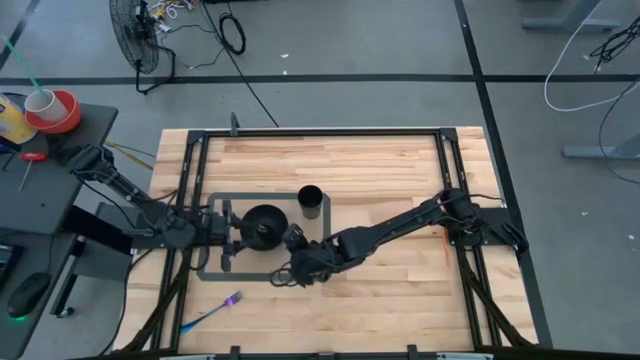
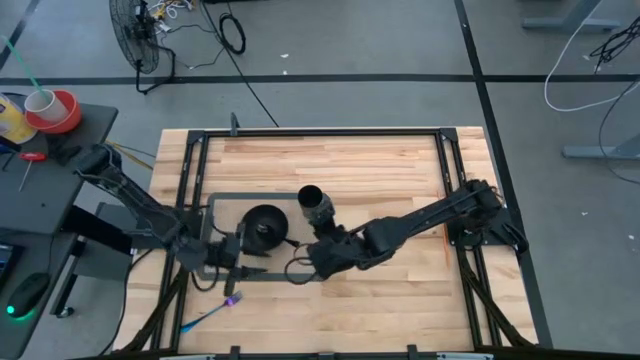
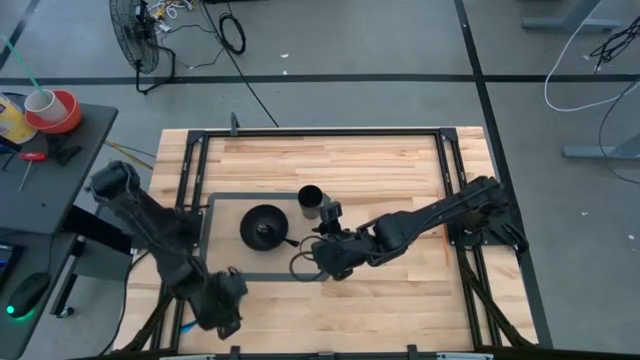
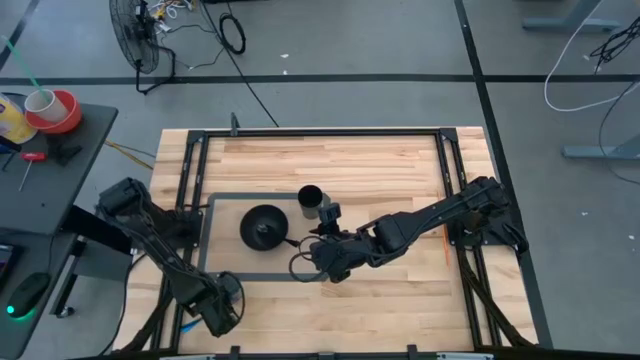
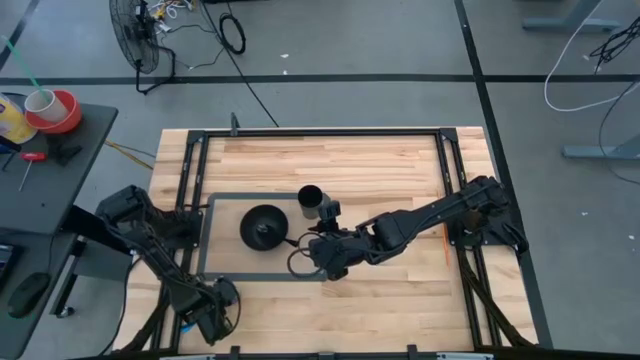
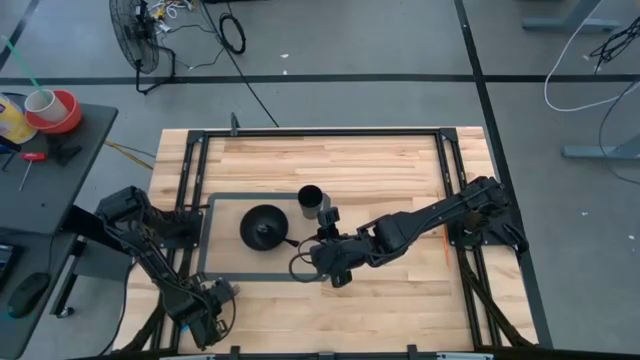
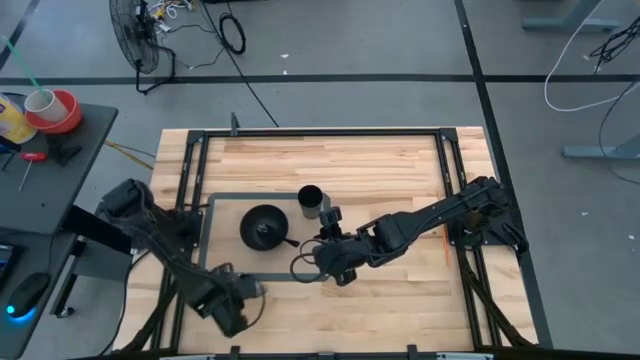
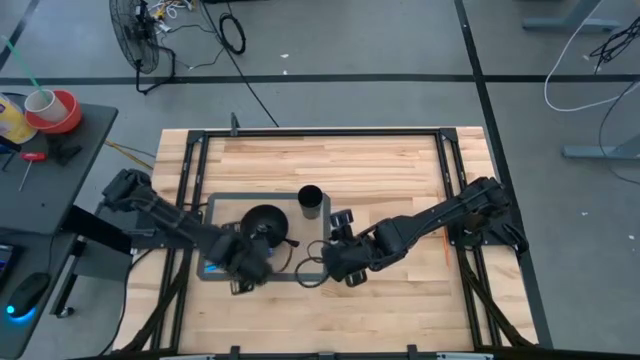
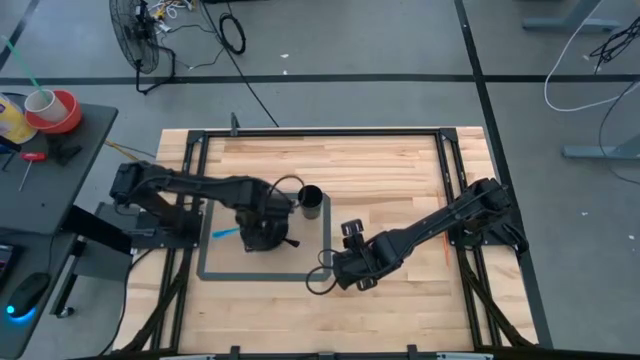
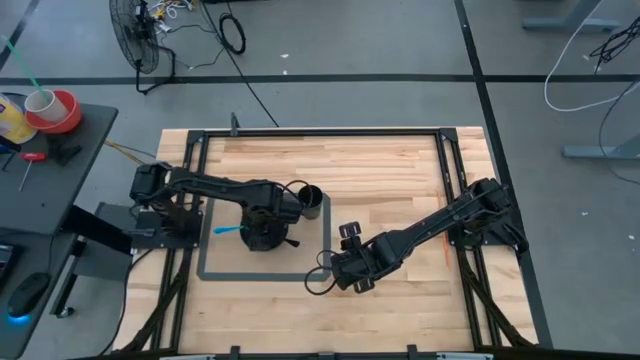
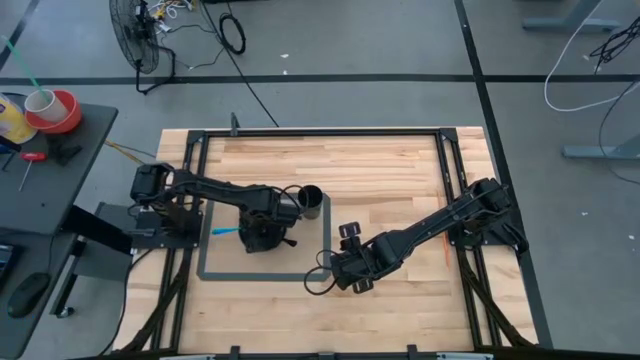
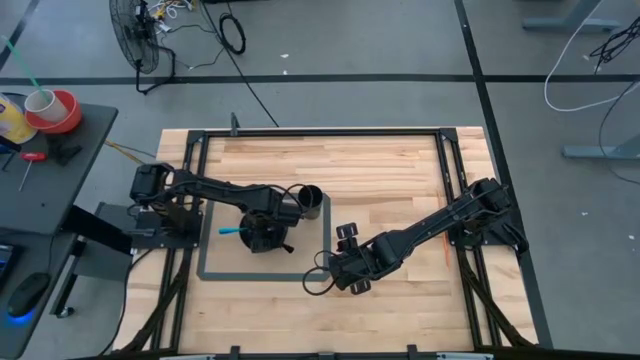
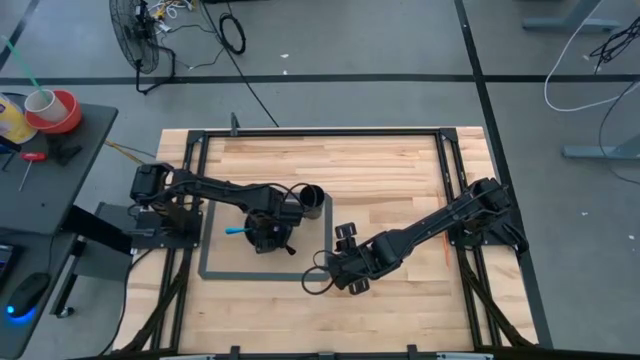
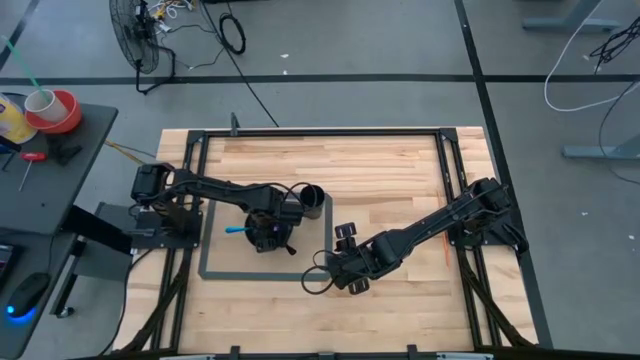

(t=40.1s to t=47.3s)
Task: Pick & Place Utensil
Put the purple fork into the black bowl

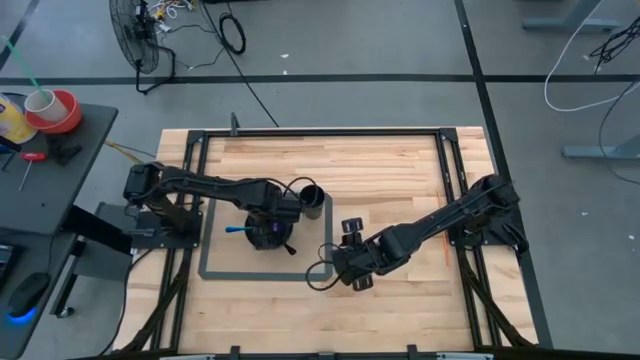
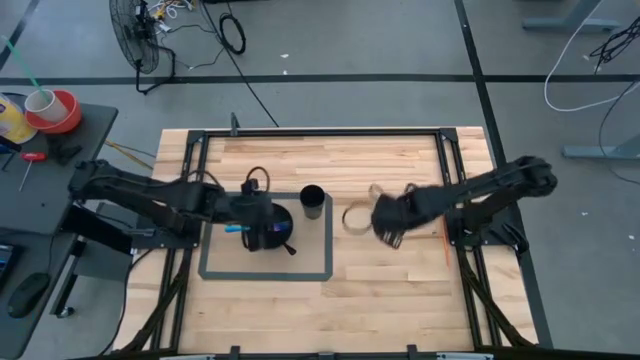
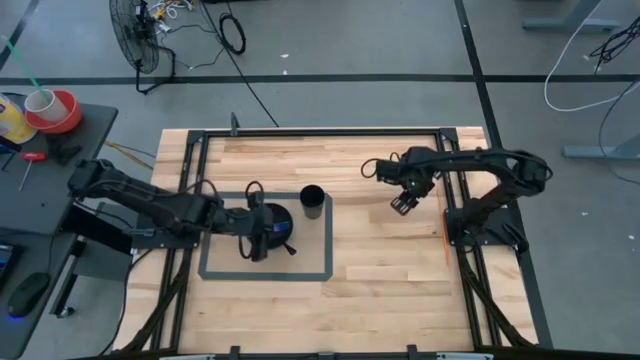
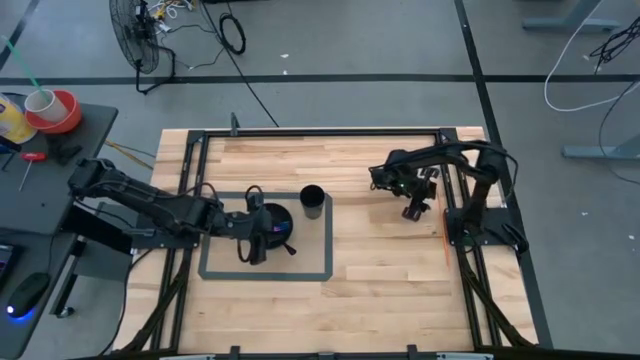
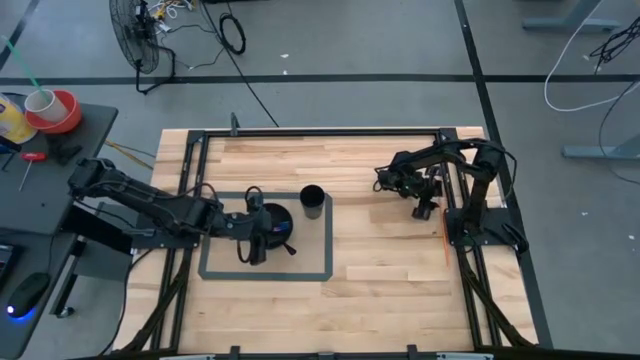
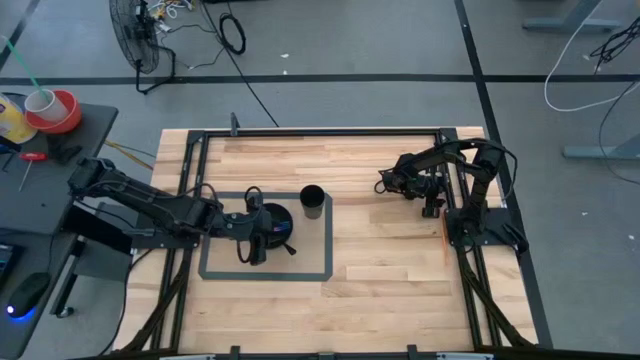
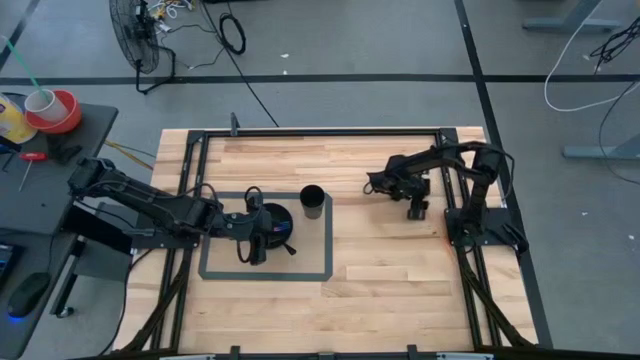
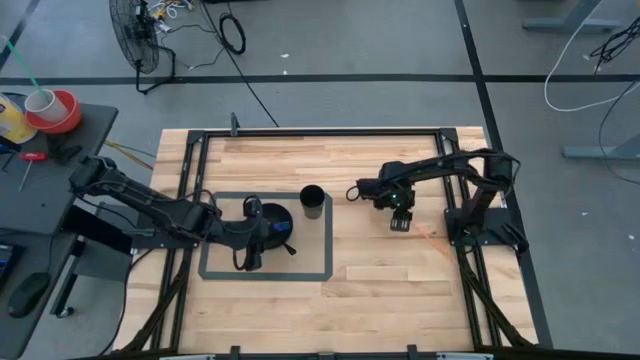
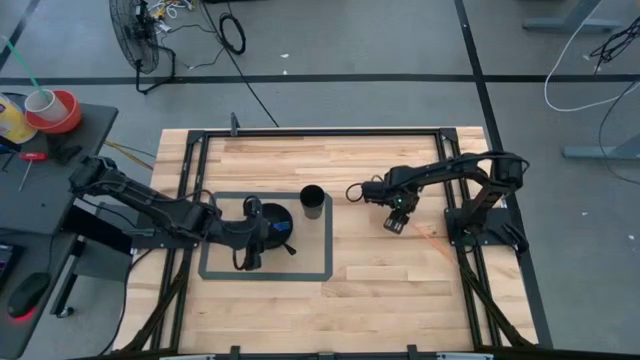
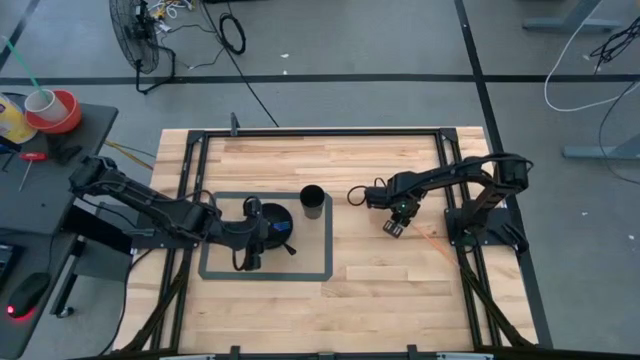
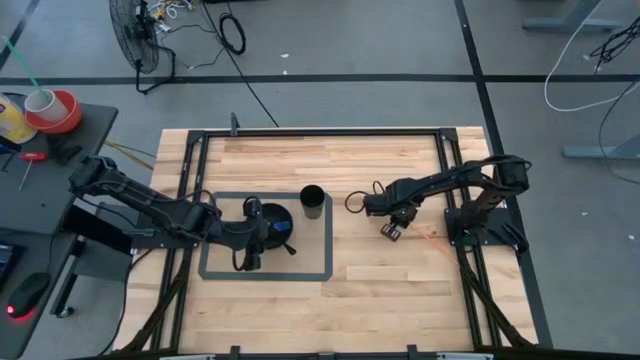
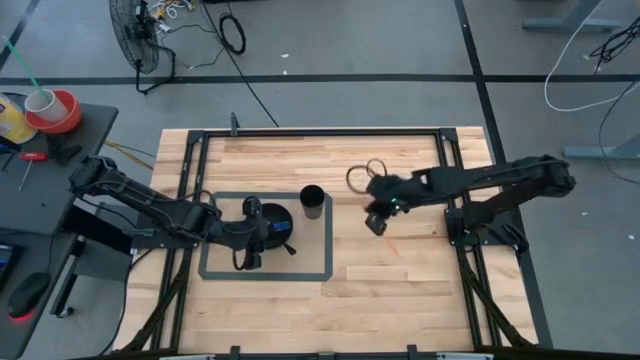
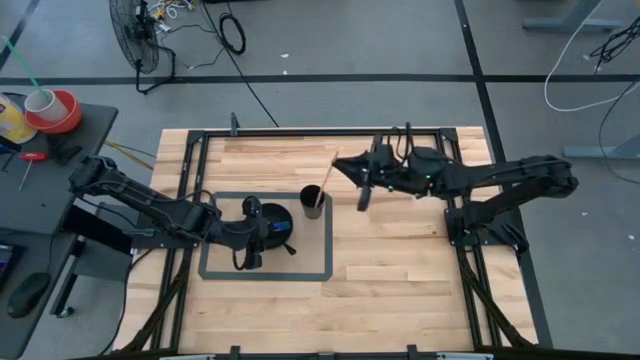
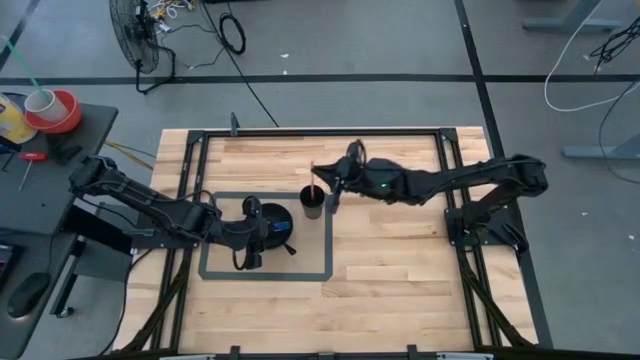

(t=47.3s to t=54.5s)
Put the orange straw into the black cup

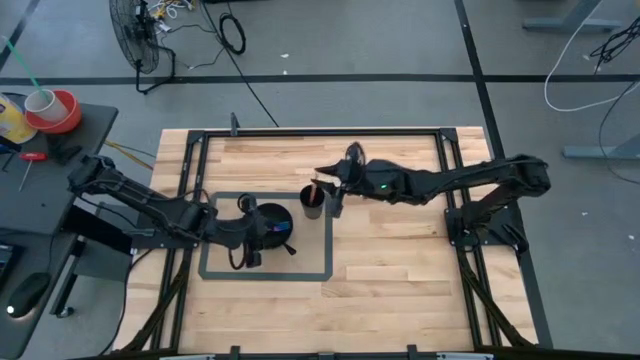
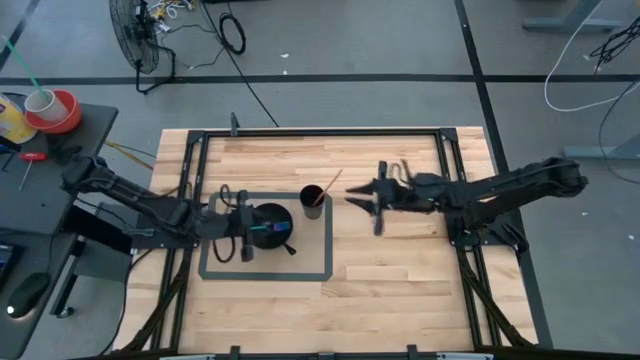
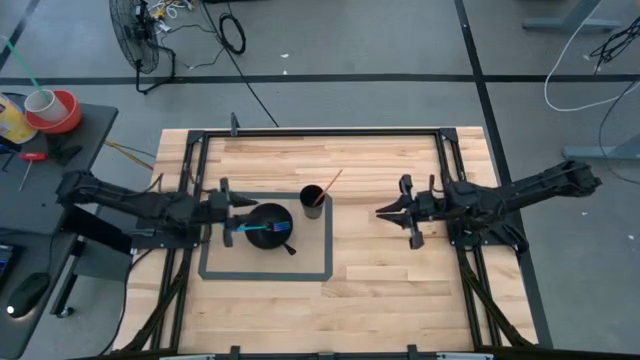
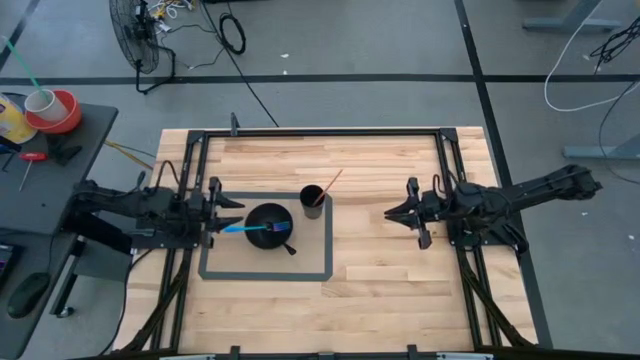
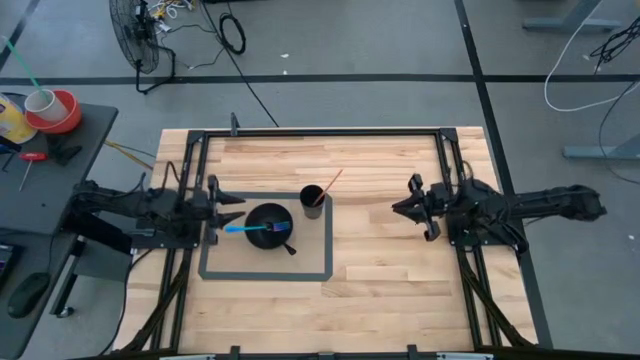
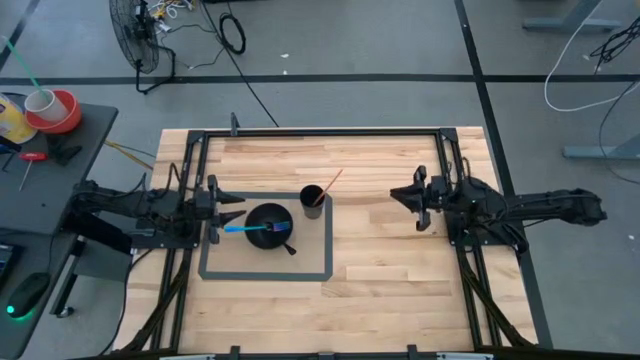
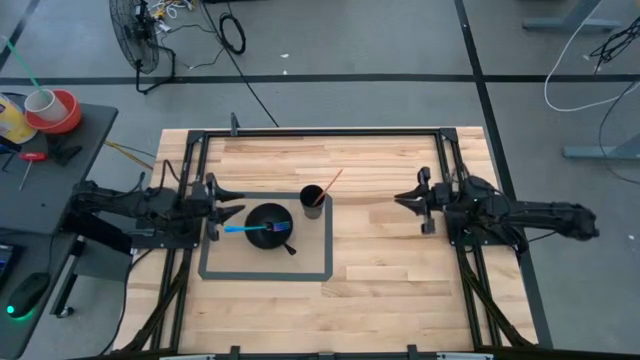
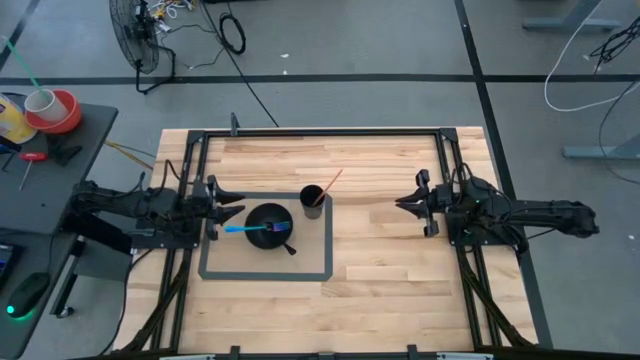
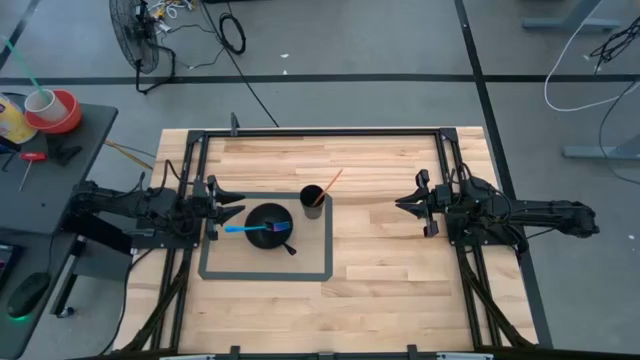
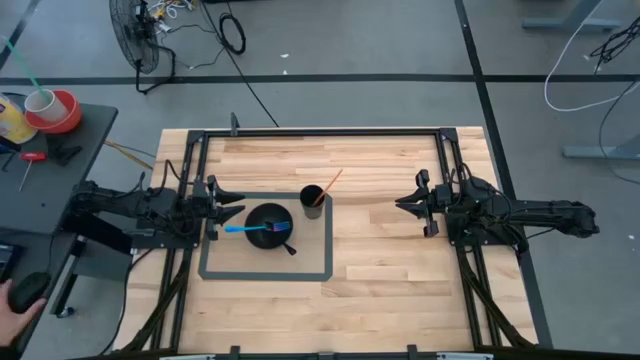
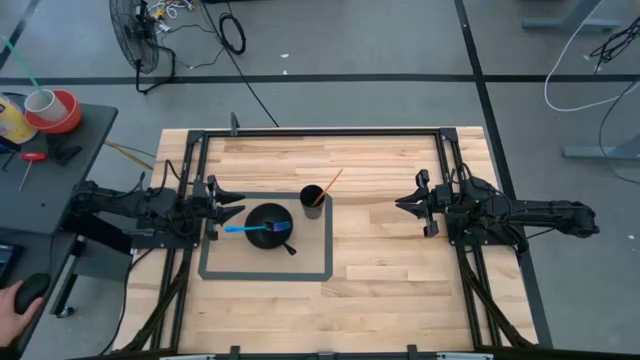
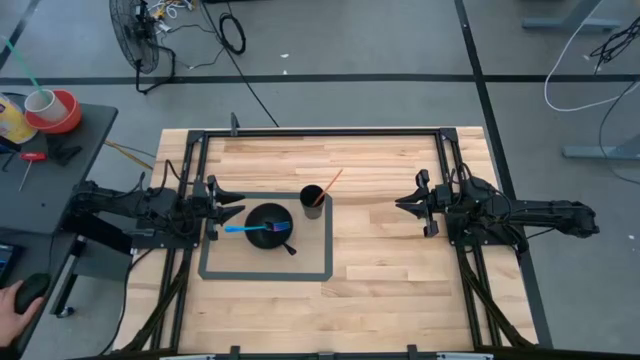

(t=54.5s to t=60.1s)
Return to Home Position
